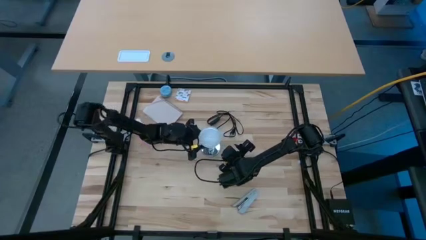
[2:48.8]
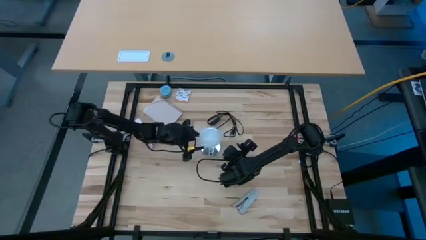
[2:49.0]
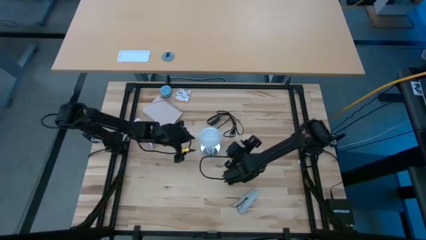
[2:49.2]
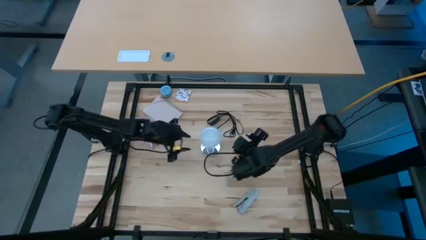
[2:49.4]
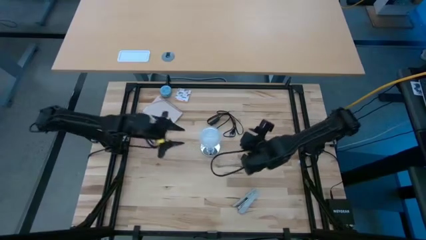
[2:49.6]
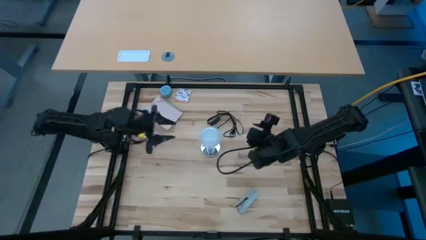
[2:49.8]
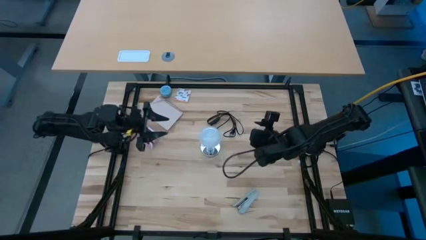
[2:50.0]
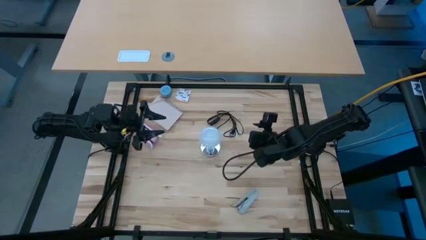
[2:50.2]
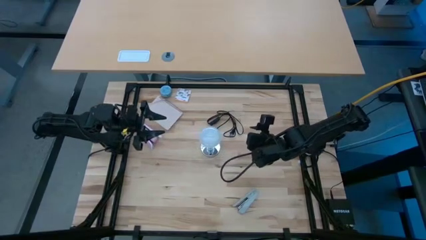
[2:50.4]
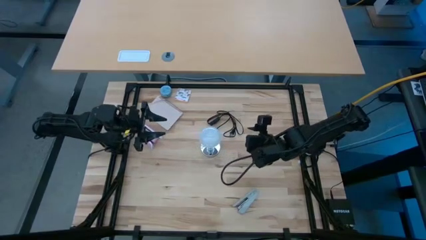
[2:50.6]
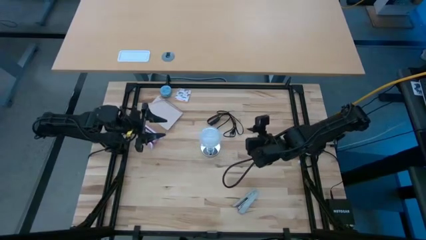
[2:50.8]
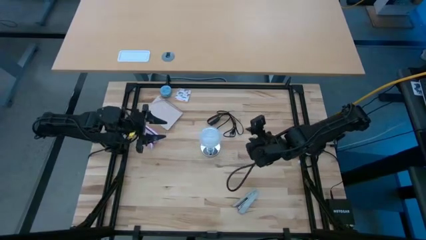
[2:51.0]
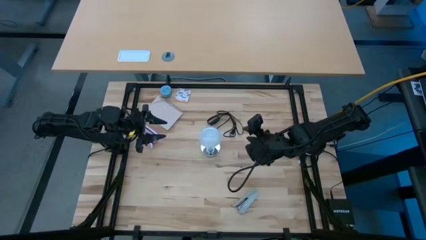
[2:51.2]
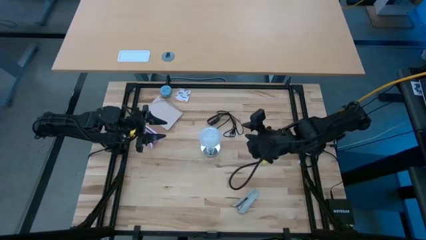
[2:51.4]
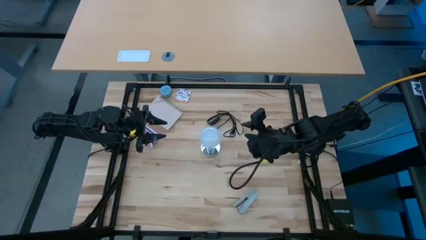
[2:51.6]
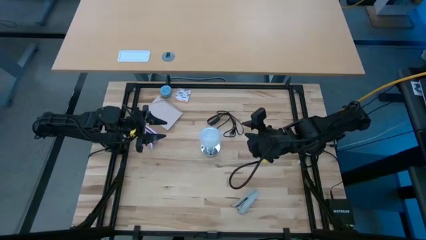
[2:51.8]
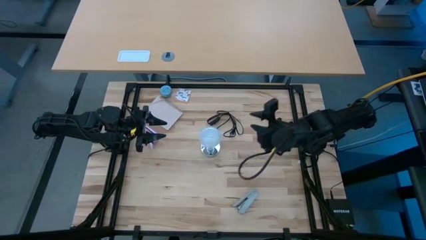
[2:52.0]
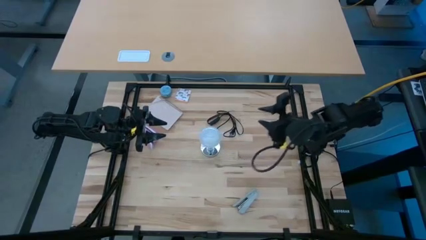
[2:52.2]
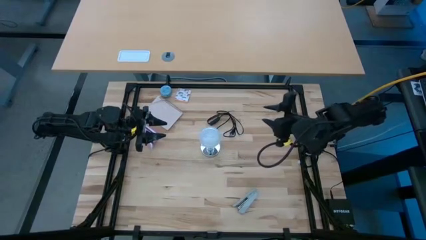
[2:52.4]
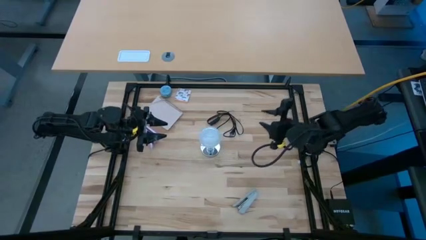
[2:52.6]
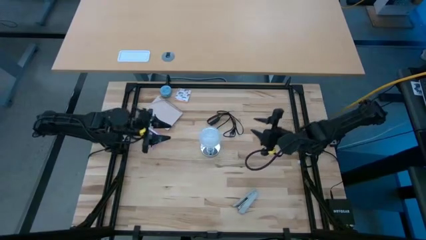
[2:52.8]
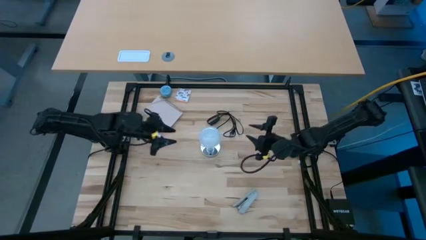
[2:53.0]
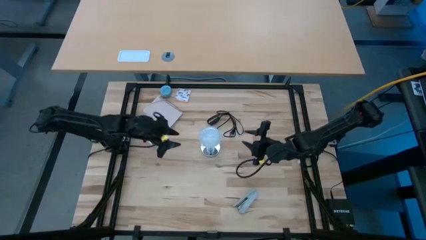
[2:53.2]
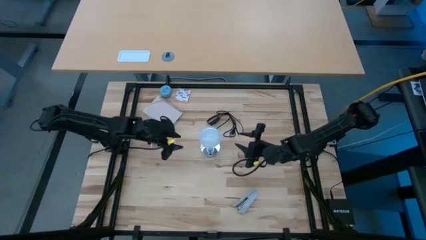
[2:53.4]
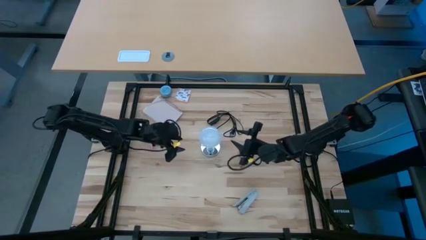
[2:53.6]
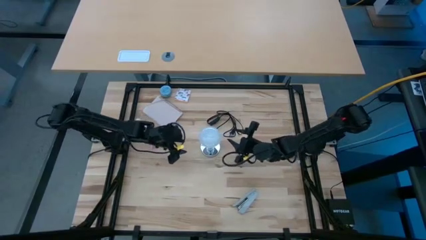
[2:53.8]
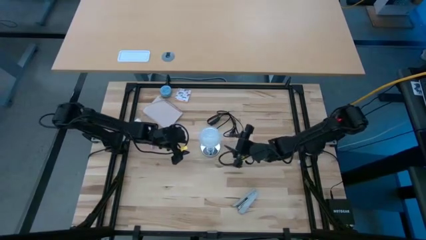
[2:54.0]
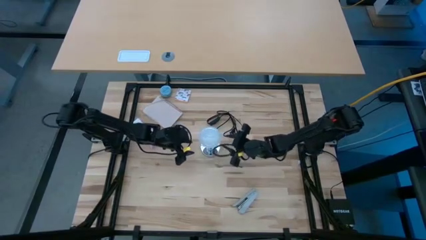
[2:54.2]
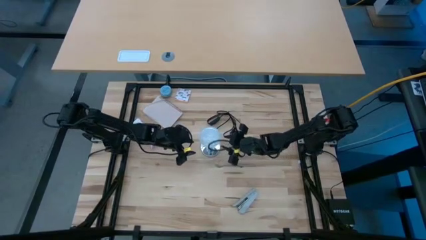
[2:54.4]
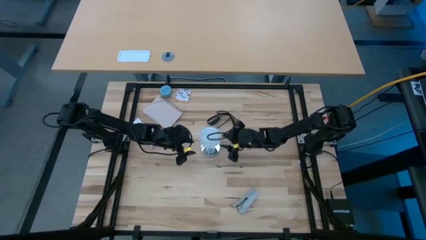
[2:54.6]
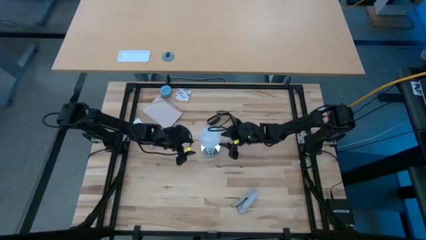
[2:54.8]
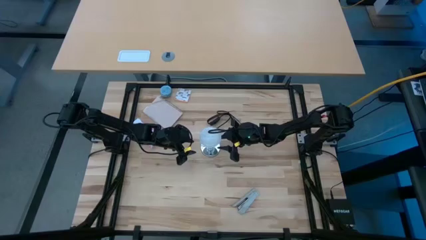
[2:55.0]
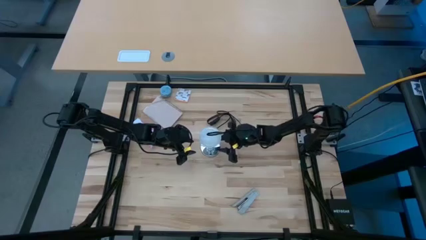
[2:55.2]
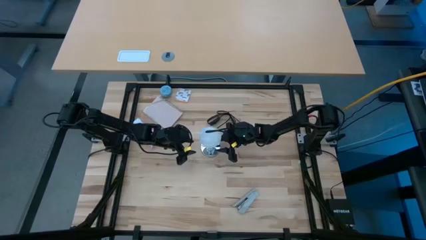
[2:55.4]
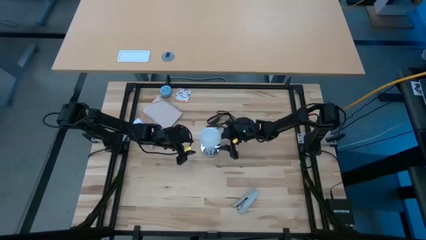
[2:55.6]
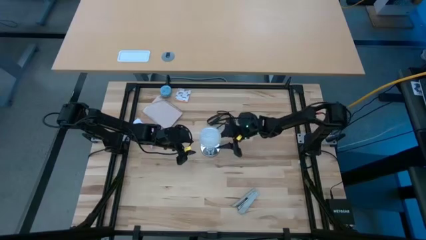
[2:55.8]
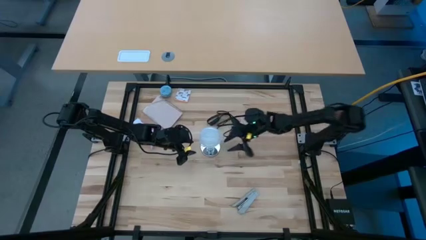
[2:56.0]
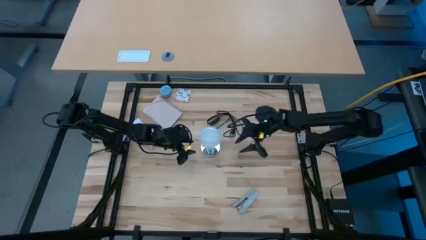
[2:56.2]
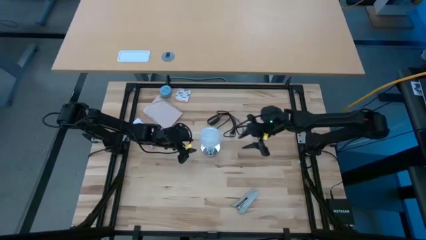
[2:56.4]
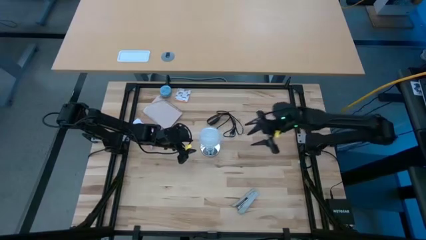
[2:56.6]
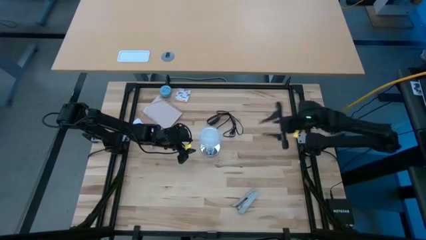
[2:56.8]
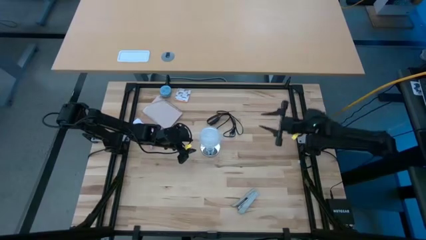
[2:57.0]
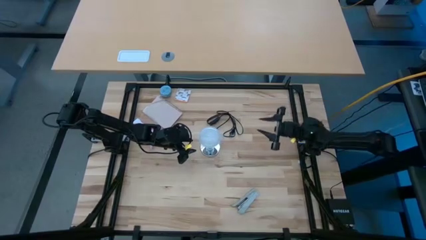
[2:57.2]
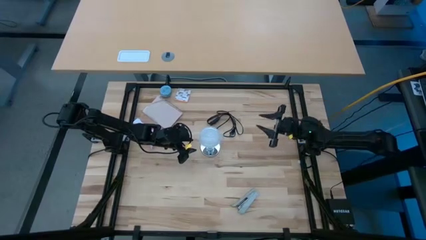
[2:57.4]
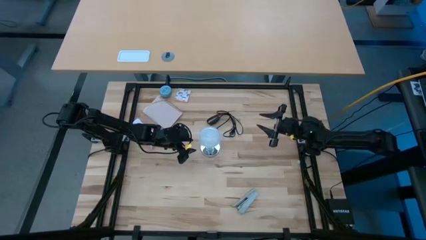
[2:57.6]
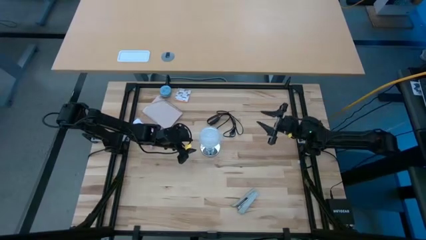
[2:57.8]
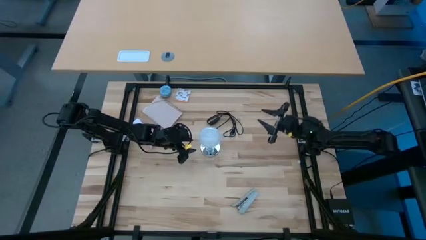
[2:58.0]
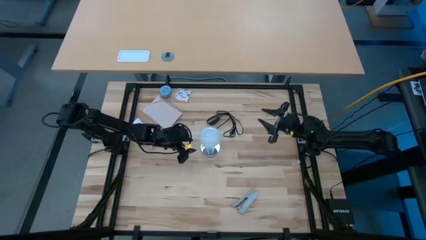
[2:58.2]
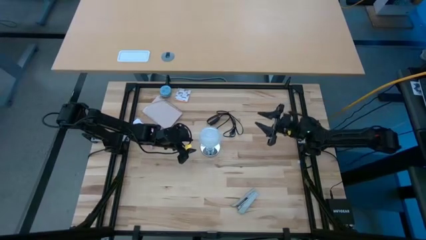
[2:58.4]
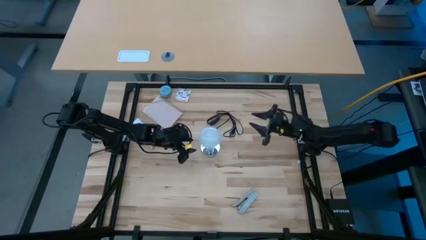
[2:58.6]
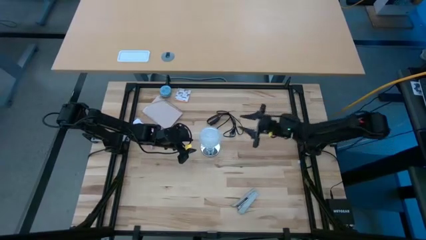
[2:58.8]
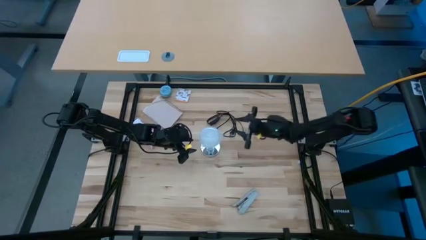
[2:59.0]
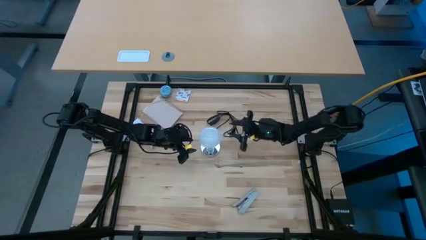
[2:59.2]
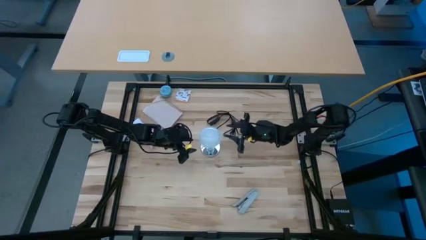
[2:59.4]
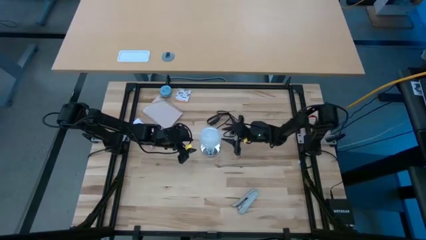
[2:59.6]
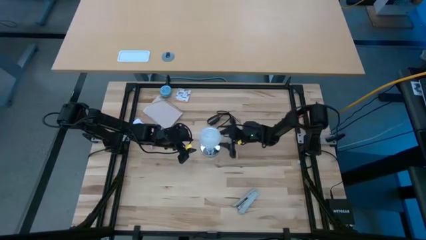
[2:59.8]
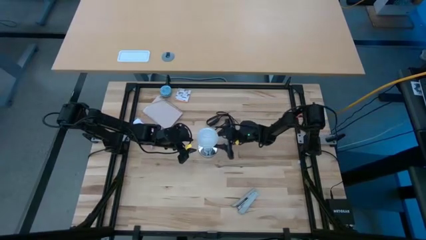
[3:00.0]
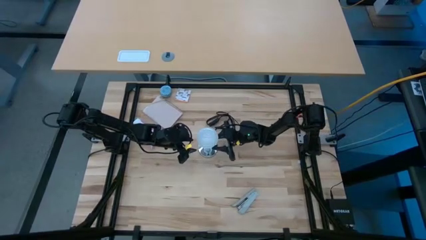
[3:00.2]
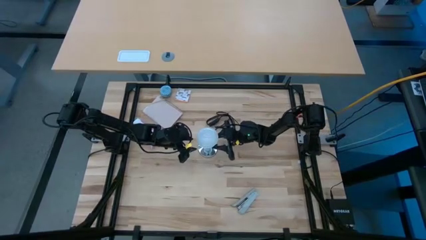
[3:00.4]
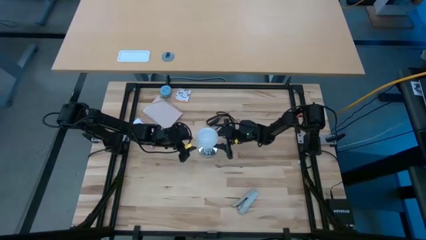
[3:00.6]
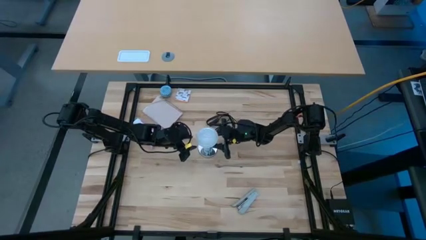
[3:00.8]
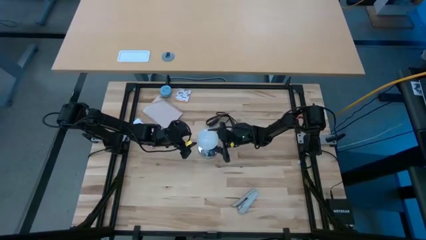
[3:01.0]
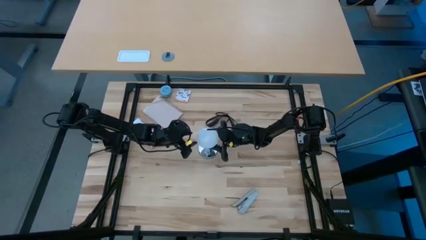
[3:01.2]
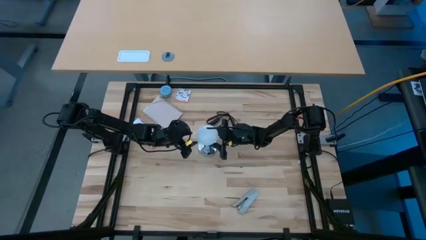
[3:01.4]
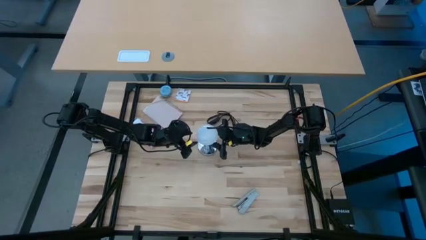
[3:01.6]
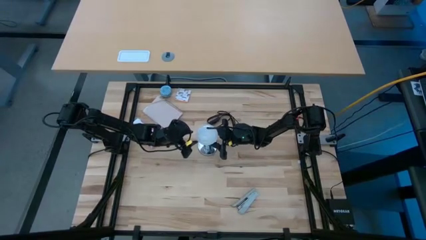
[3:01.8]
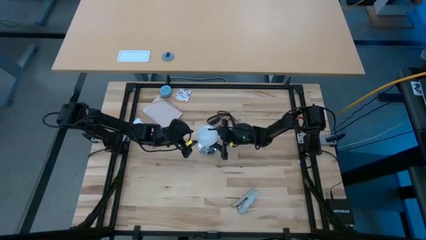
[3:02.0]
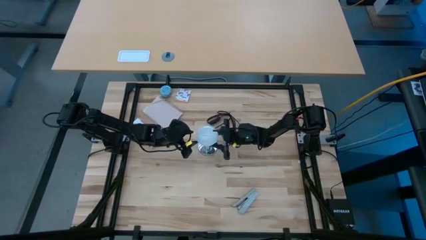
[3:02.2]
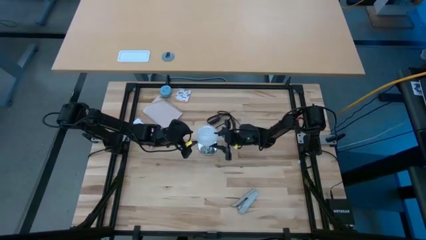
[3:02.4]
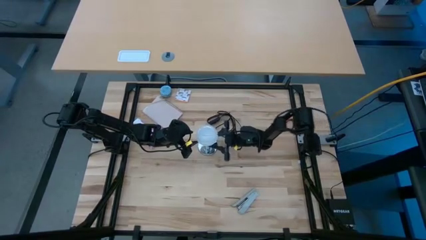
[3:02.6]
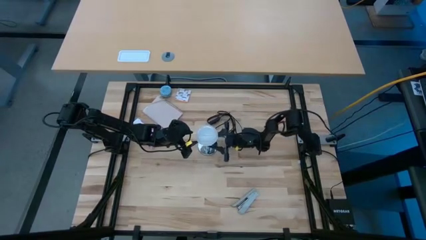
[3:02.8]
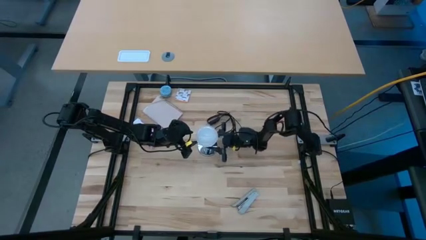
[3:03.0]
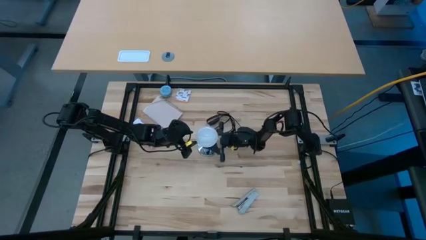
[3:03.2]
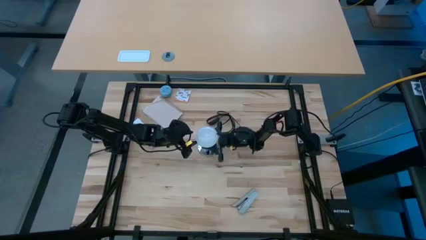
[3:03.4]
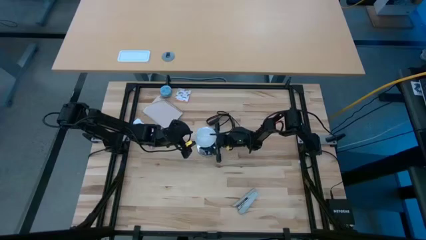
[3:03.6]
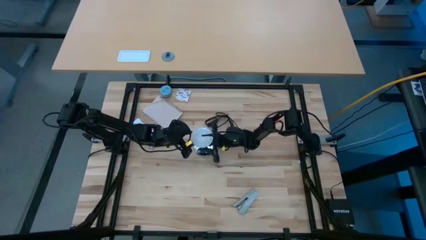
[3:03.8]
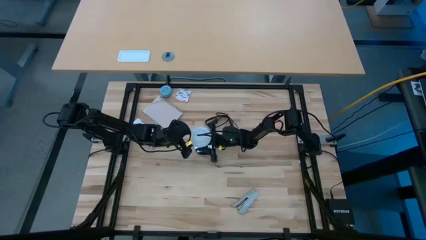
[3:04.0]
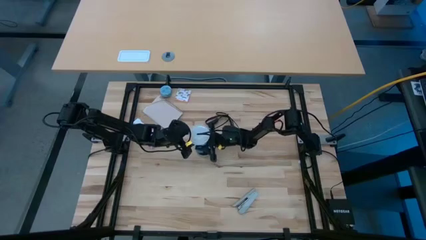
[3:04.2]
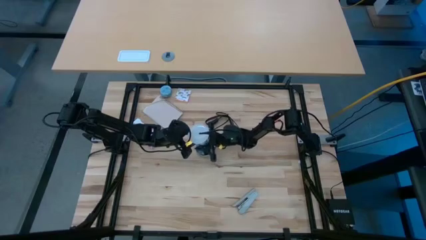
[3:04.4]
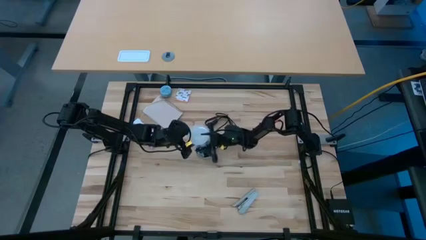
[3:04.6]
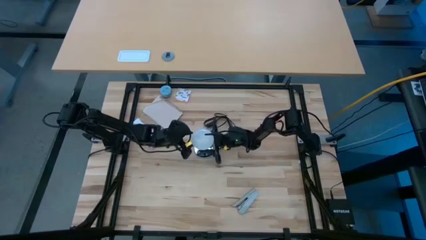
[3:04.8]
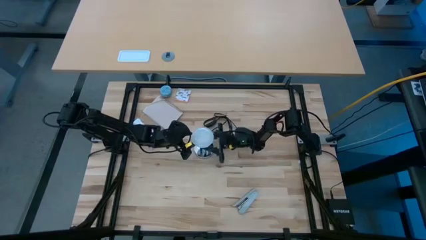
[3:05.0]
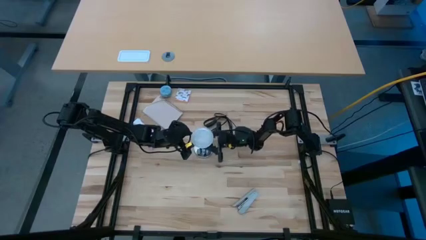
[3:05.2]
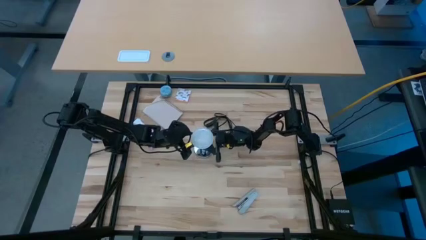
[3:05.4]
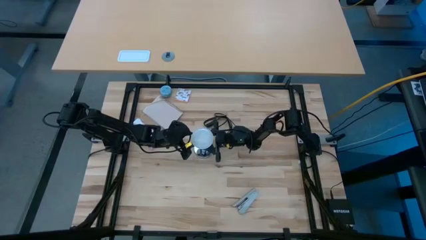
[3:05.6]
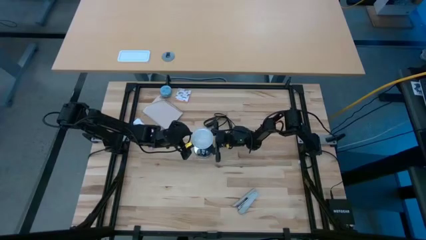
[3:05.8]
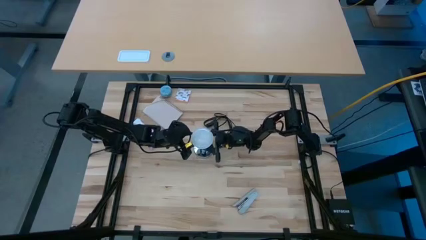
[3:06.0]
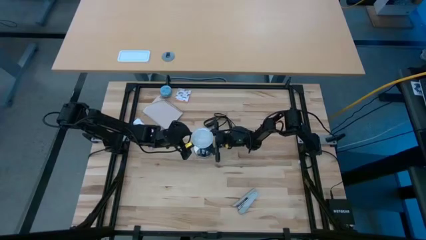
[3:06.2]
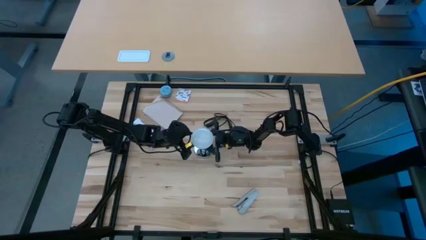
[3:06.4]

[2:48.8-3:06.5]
Task: Screw lightbulb
Remove the lightbulb from the lamp
